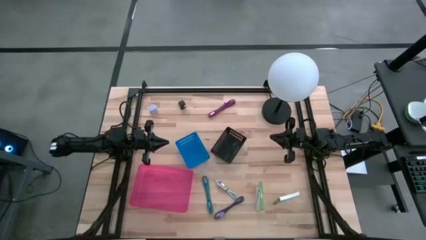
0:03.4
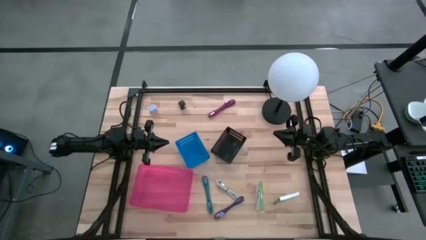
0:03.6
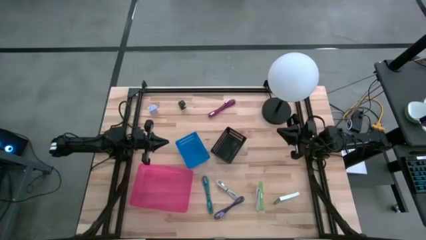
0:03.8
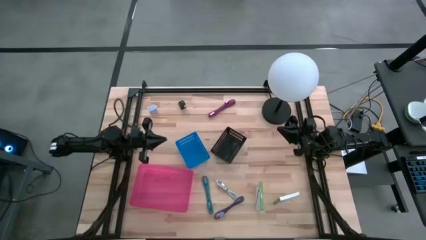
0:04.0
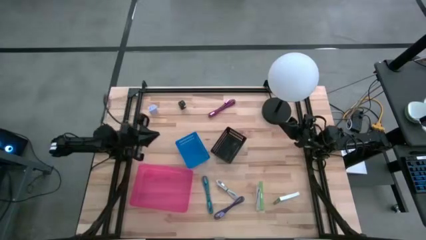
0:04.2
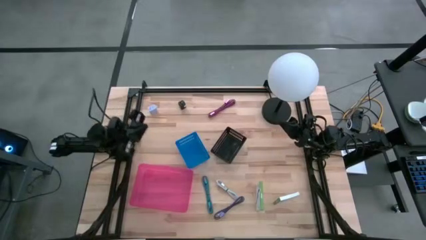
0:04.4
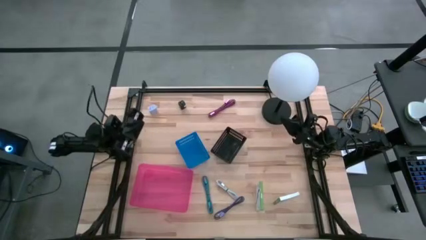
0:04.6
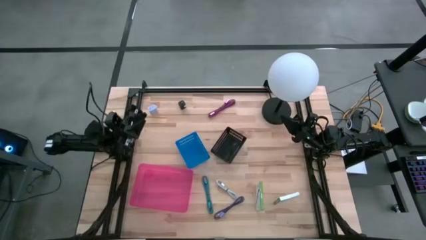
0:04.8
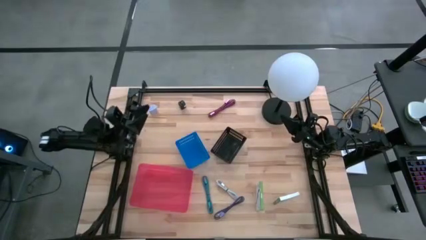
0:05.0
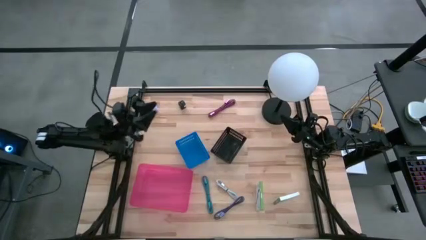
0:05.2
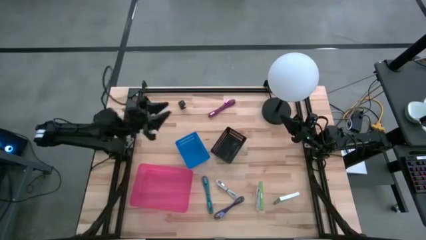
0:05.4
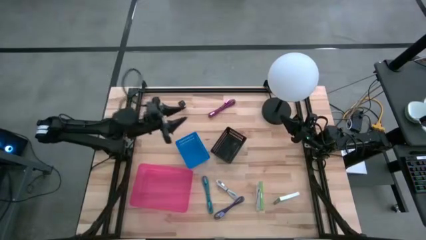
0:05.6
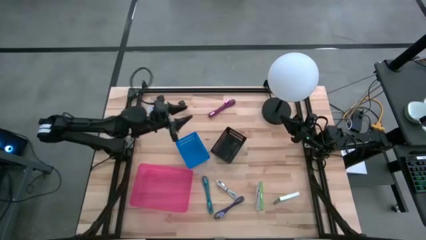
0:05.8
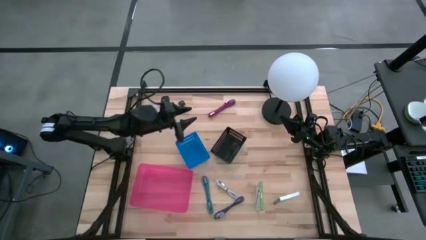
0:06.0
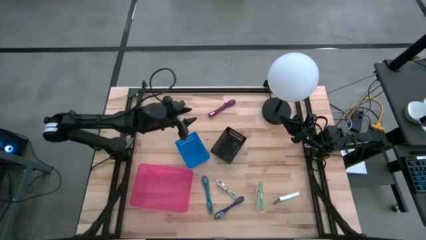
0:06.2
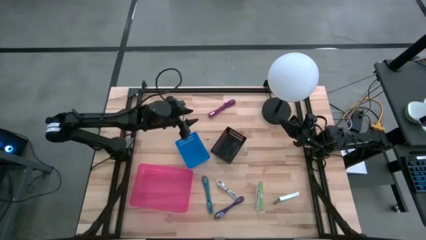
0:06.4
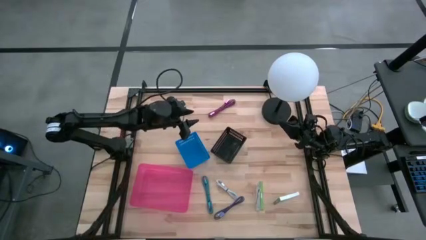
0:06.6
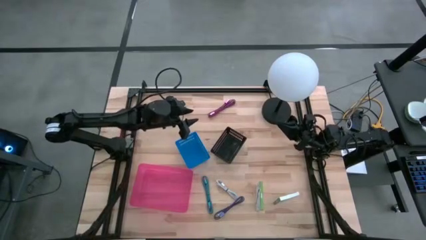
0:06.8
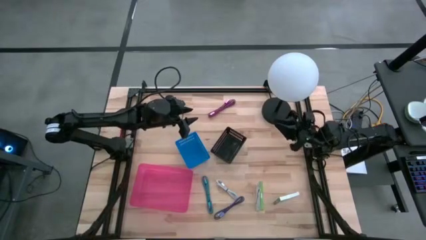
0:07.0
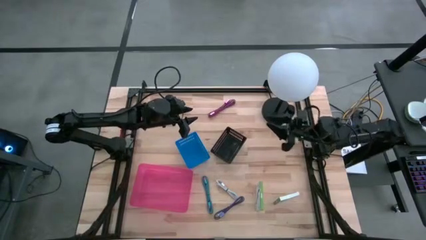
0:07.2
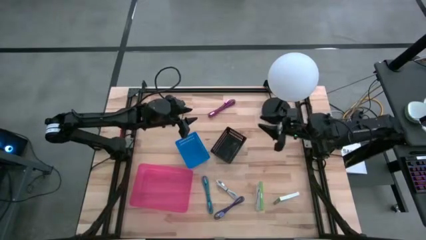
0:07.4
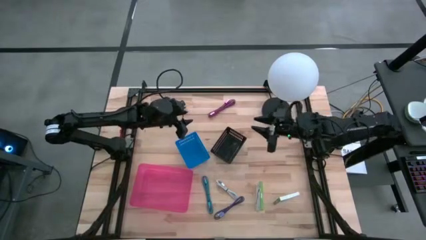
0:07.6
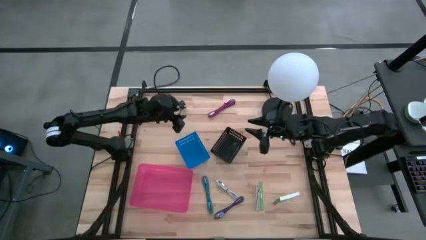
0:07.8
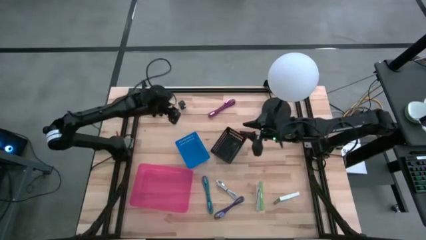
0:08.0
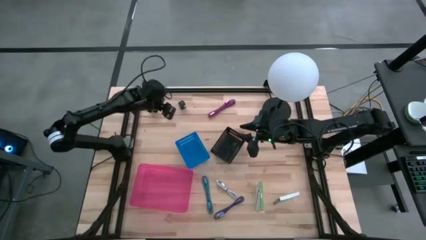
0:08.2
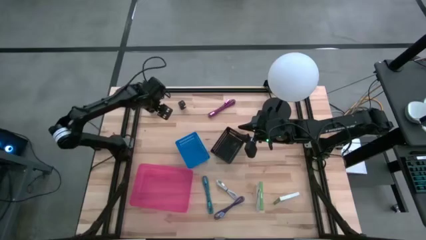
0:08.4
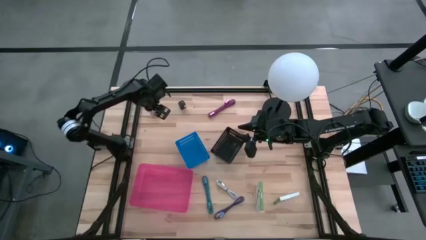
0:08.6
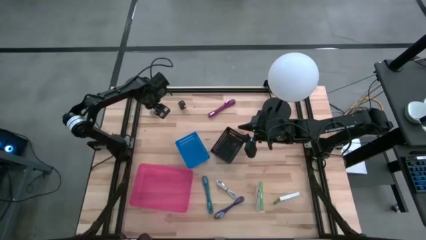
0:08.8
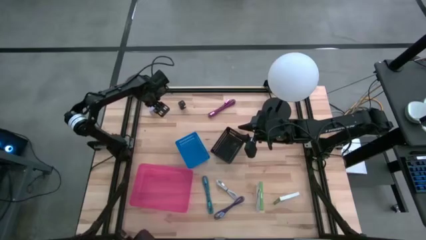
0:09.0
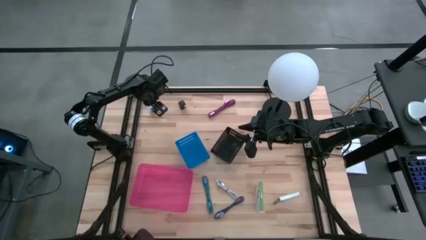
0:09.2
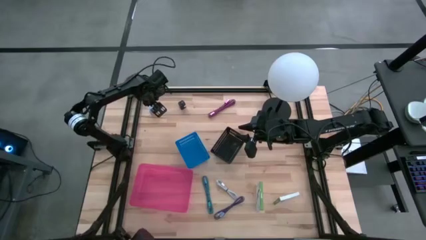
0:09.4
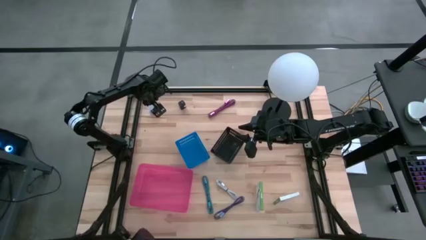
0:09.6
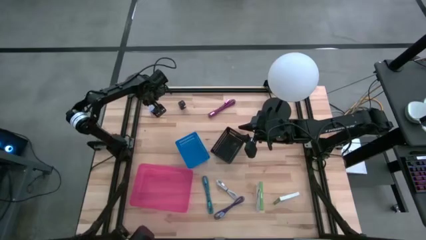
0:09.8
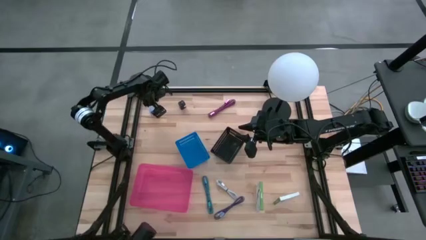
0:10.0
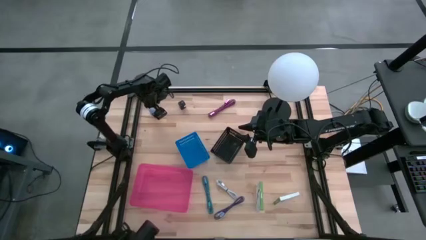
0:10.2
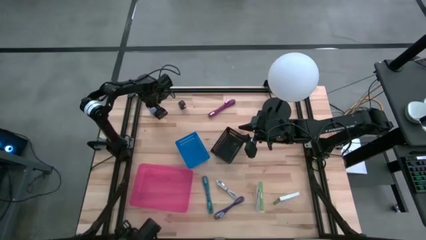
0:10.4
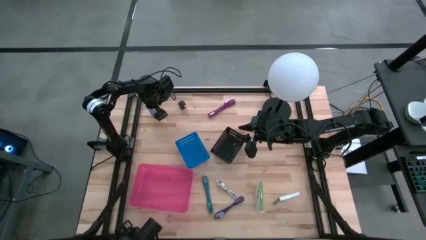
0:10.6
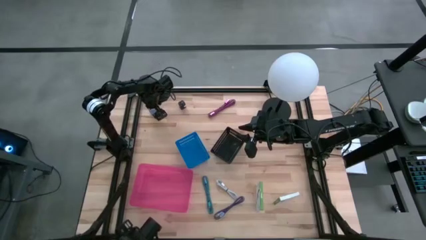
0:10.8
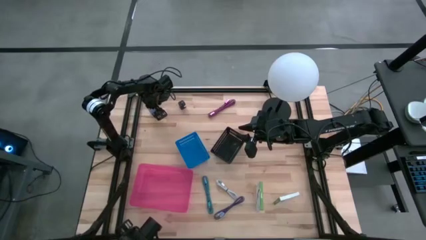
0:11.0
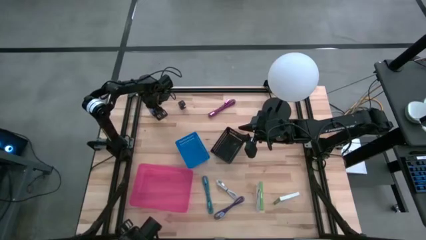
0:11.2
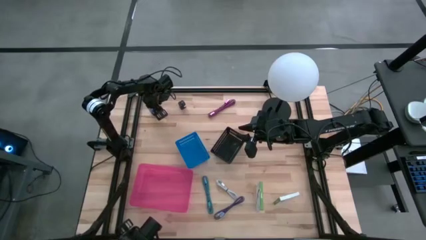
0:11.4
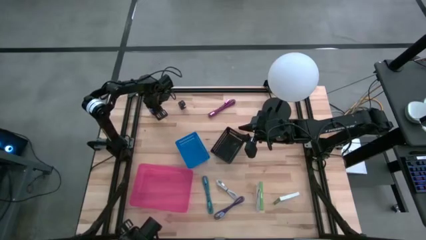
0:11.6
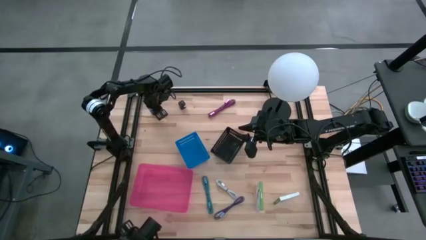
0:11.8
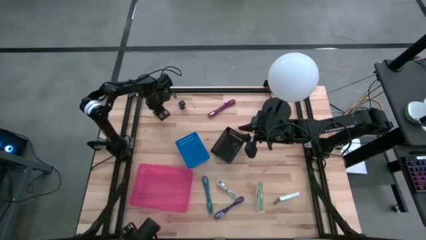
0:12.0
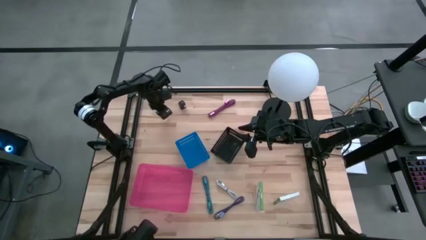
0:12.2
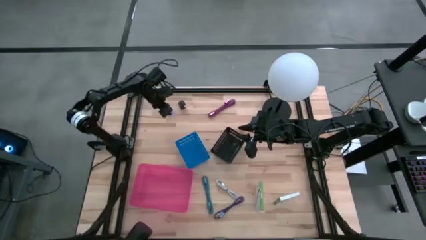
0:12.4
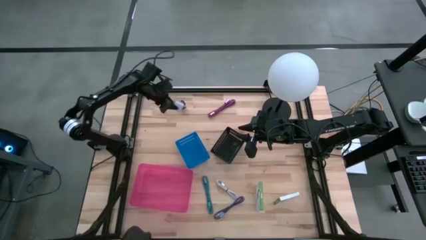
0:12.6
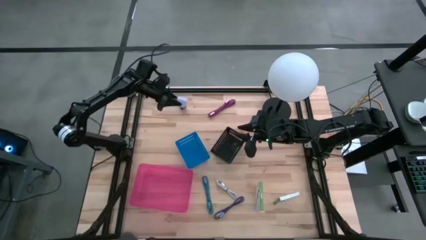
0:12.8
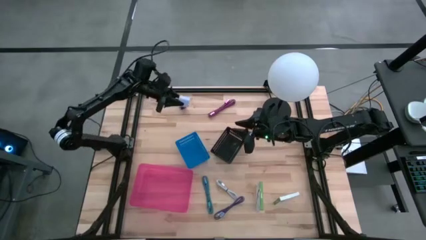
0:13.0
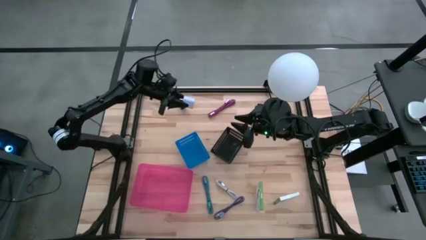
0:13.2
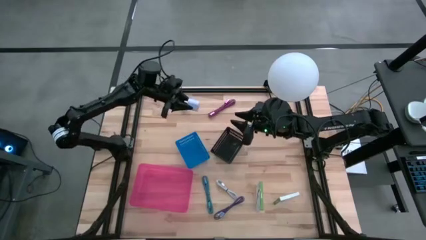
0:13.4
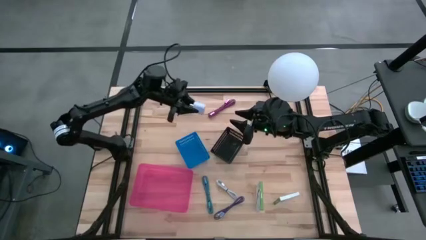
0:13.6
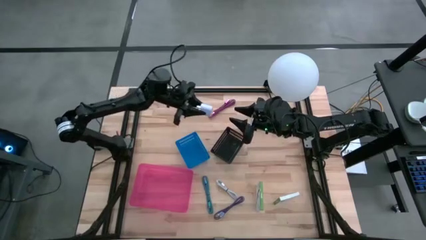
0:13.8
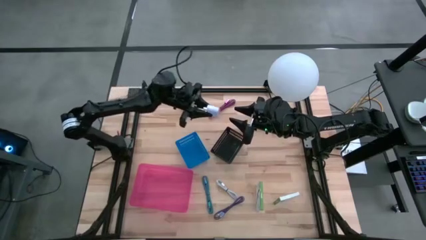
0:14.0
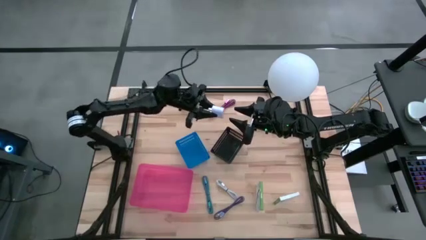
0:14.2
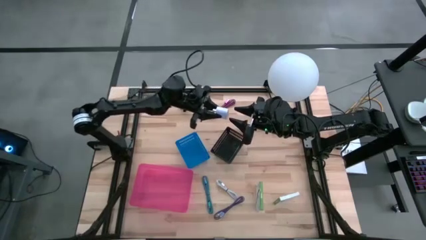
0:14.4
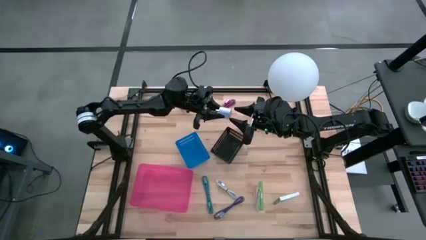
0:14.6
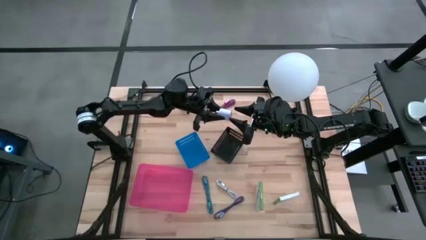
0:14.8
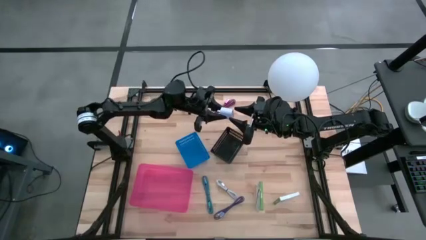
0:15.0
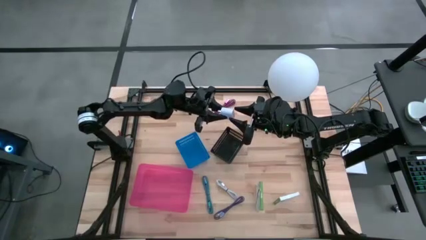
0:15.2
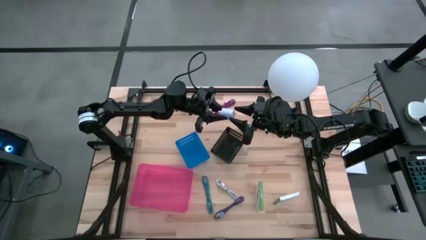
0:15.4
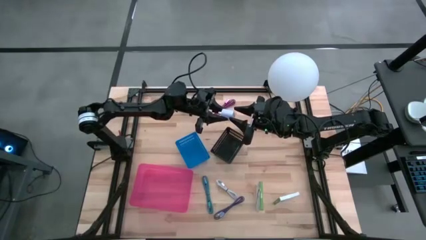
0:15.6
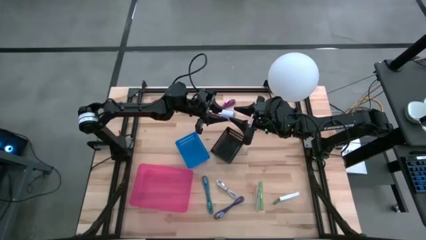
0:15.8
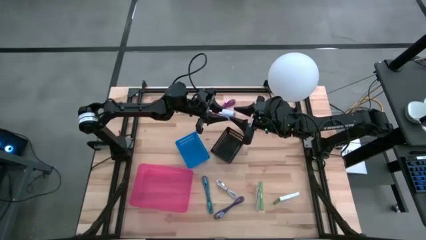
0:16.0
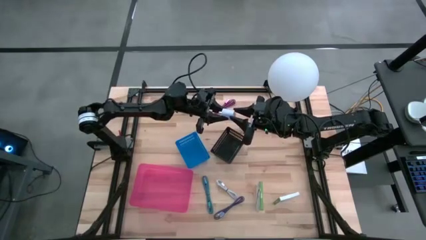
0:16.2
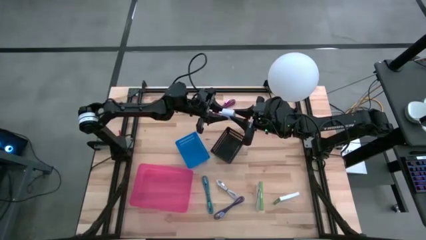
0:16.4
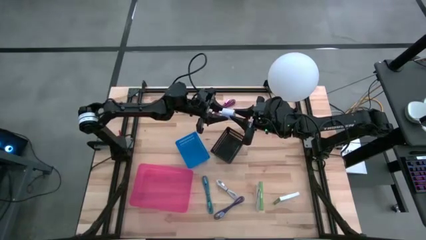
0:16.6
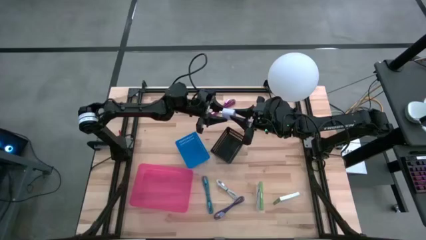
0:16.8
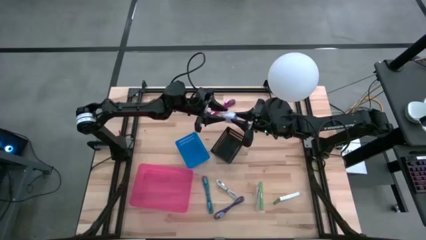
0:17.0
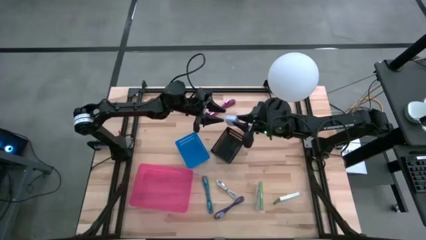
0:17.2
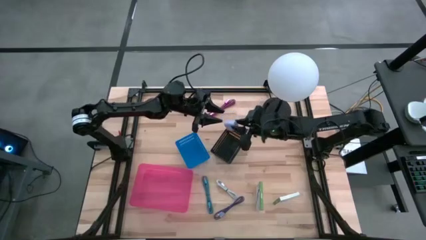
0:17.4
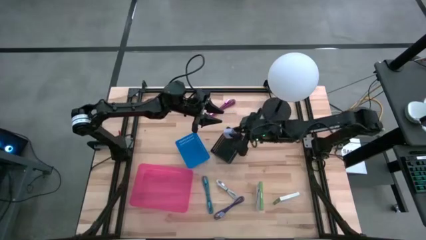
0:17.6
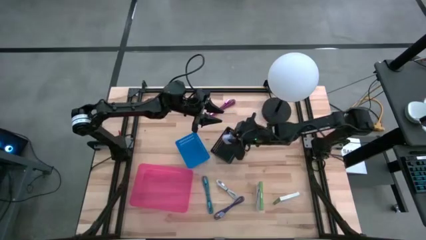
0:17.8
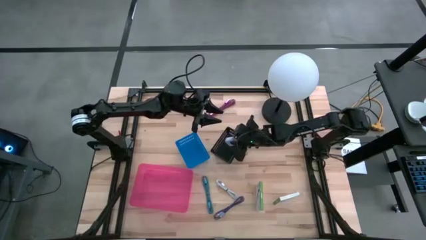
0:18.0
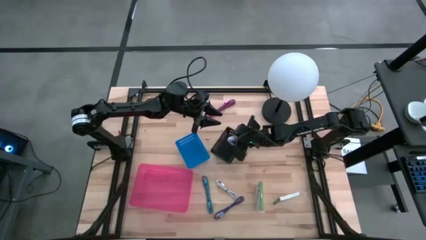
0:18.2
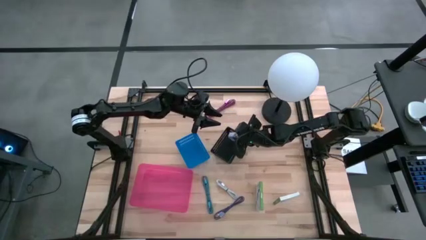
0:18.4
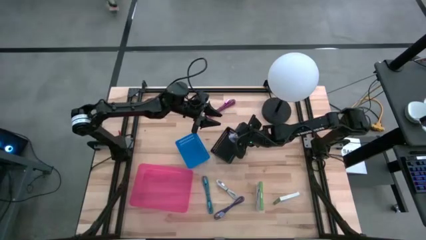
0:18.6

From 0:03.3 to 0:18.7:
Task: Pick and place items into bin
Put the white charger adapter into the black bin
